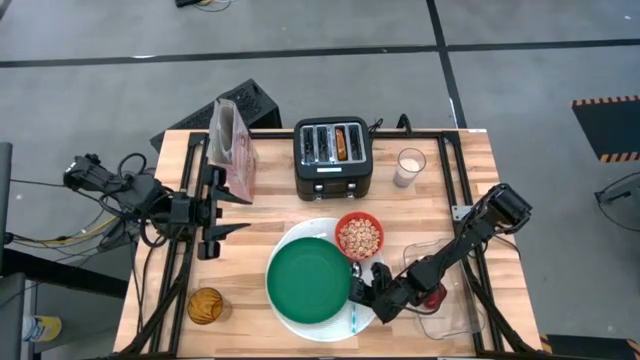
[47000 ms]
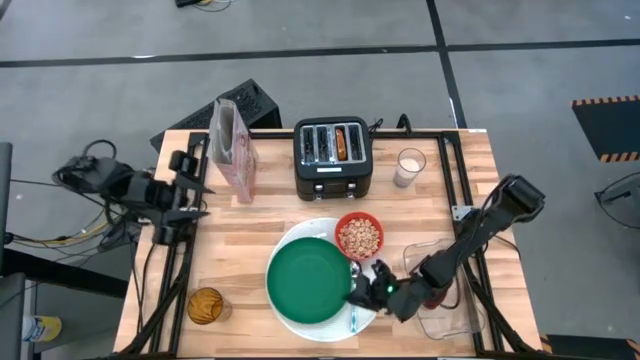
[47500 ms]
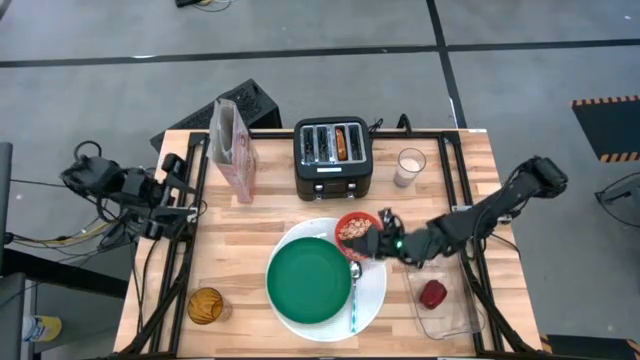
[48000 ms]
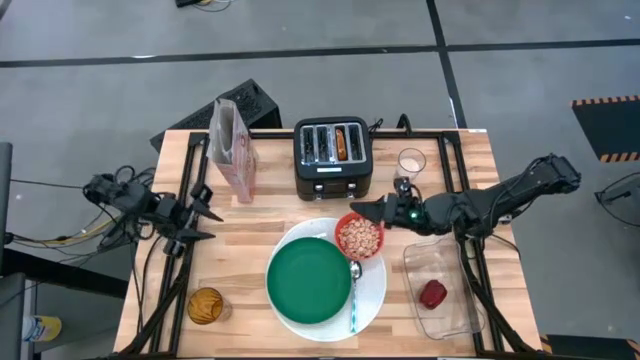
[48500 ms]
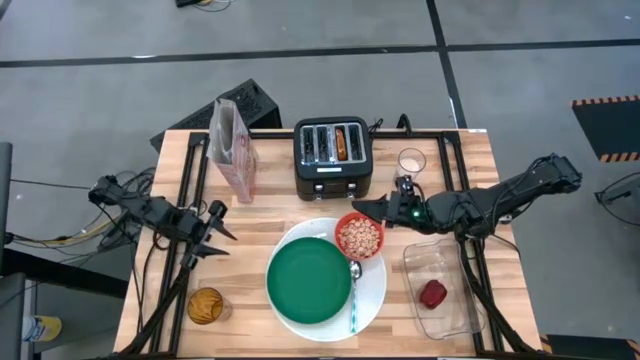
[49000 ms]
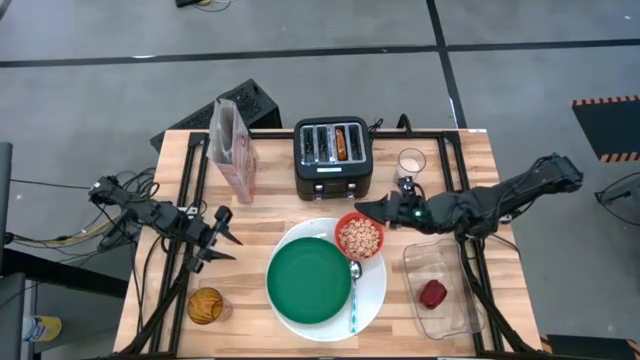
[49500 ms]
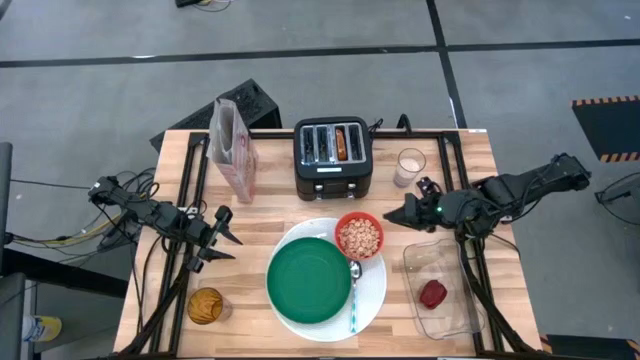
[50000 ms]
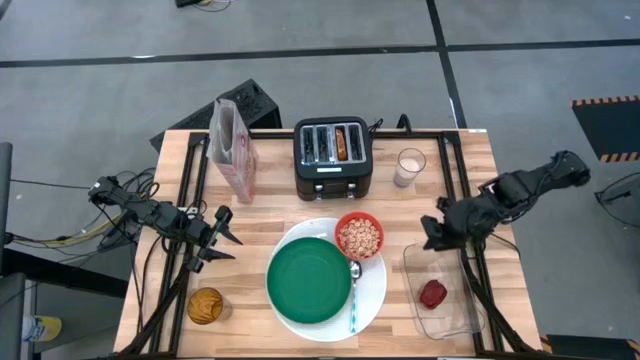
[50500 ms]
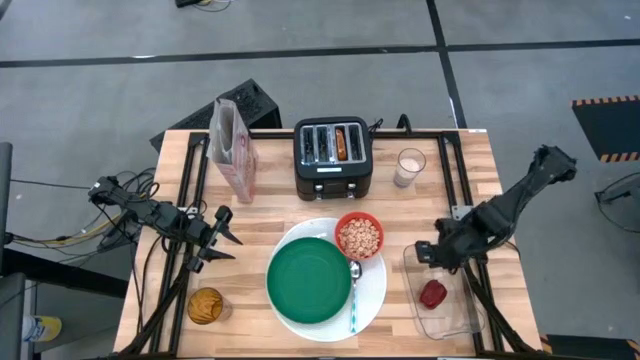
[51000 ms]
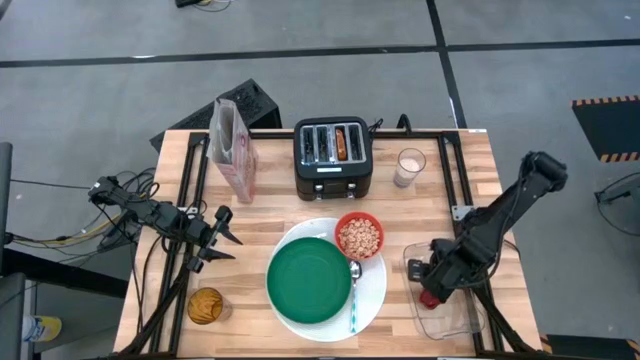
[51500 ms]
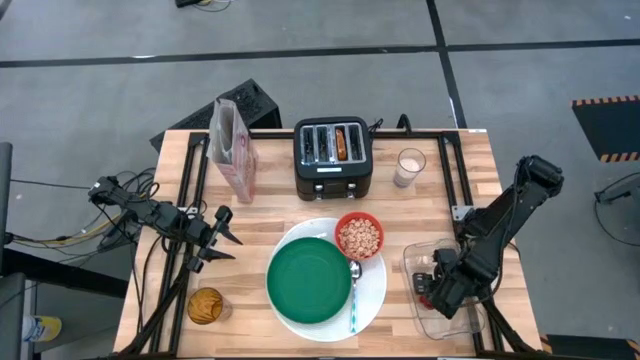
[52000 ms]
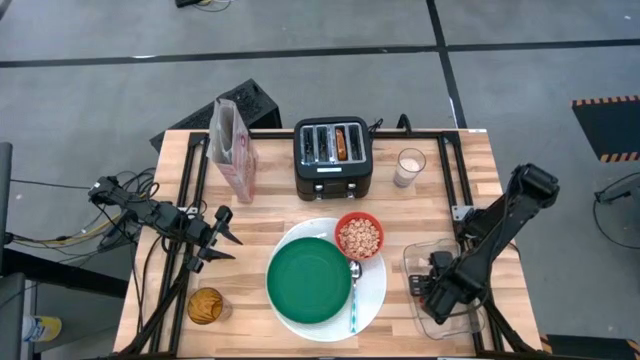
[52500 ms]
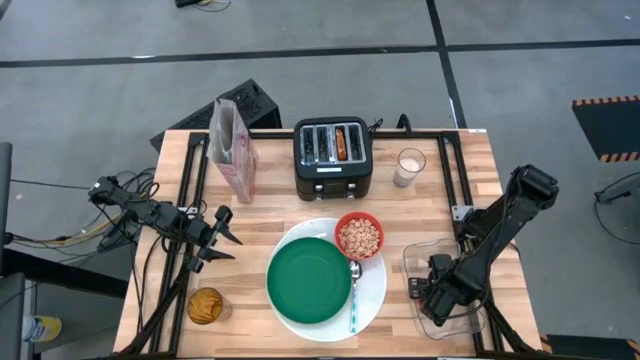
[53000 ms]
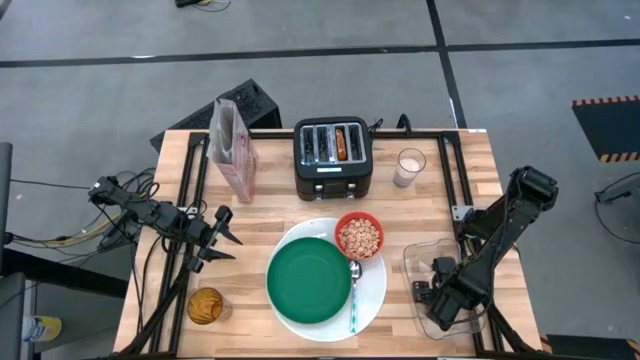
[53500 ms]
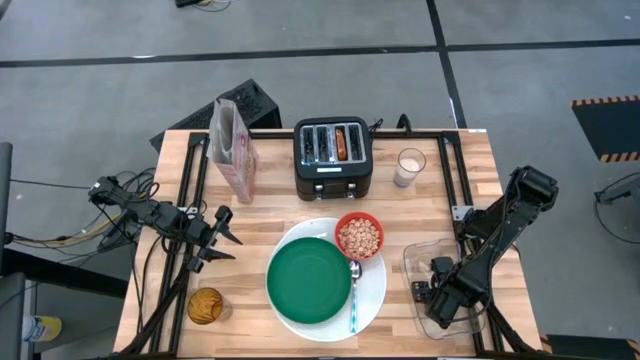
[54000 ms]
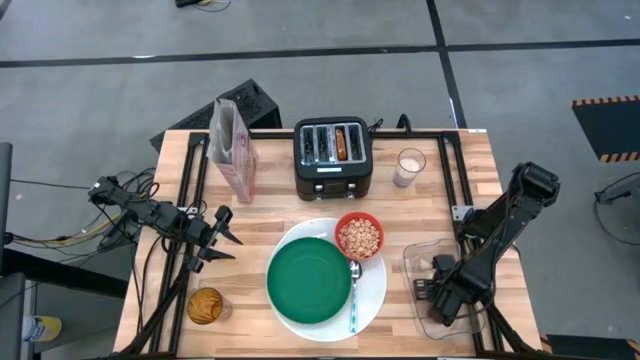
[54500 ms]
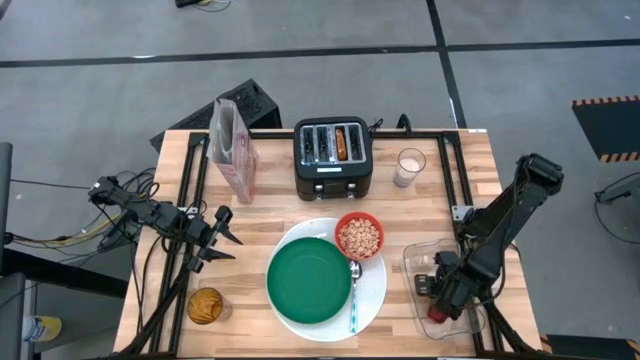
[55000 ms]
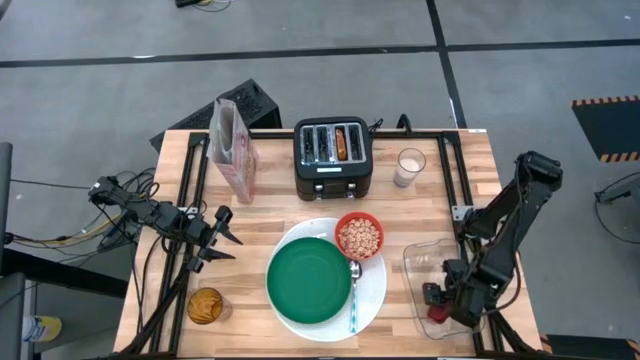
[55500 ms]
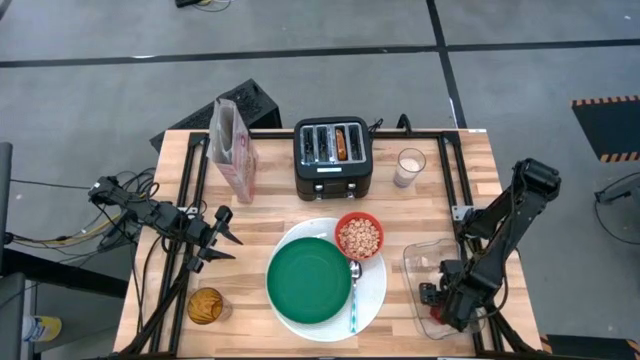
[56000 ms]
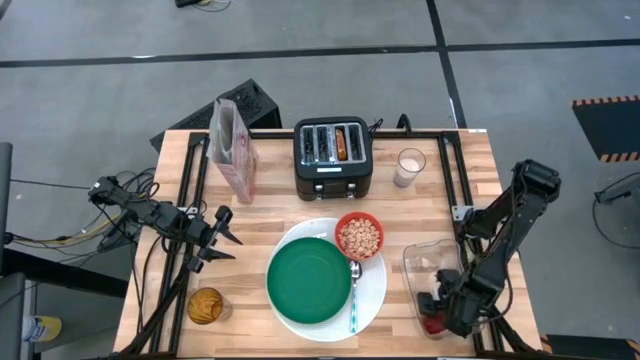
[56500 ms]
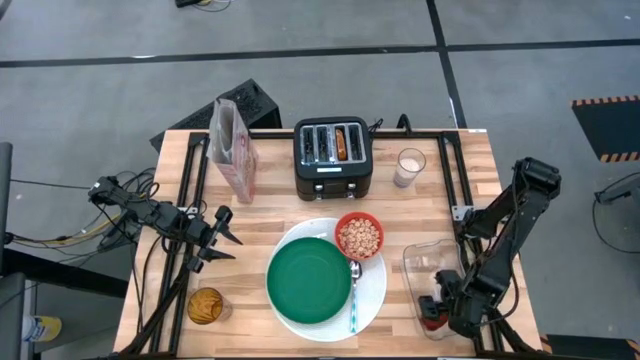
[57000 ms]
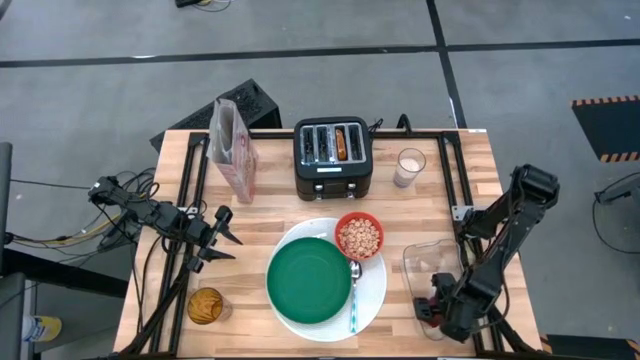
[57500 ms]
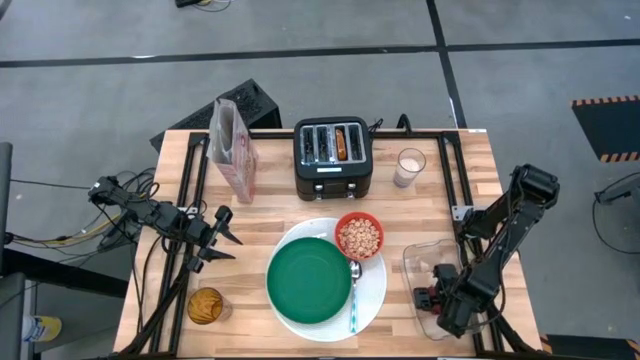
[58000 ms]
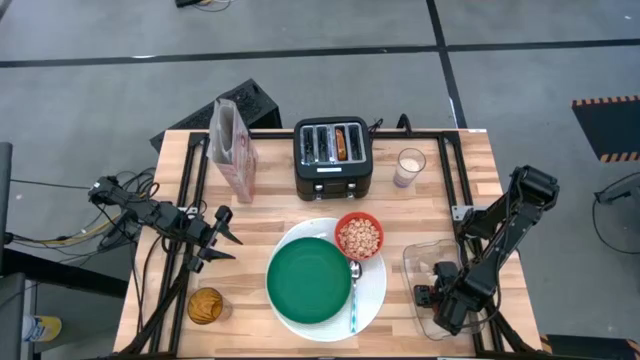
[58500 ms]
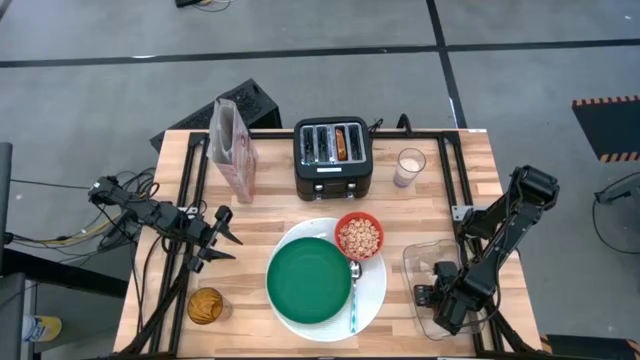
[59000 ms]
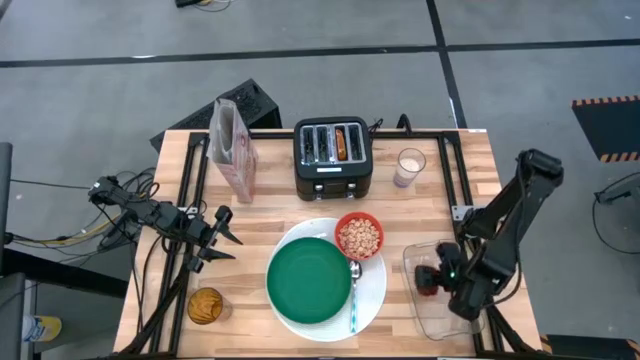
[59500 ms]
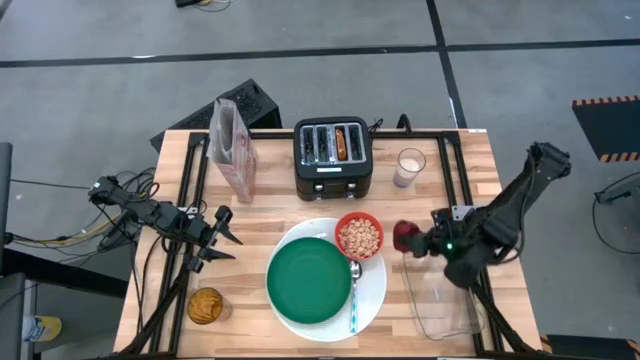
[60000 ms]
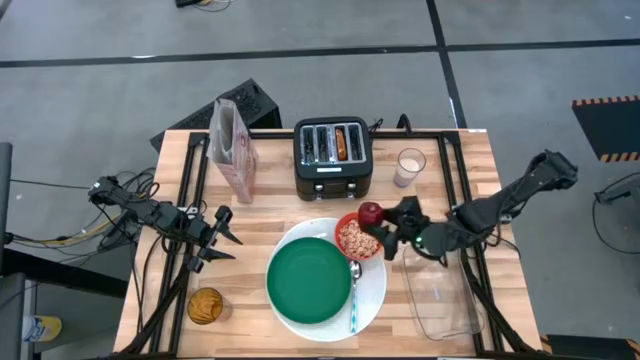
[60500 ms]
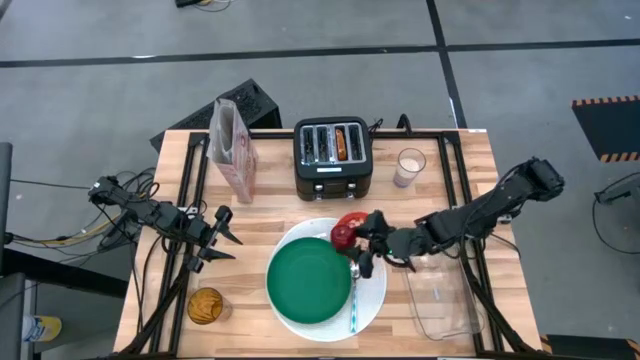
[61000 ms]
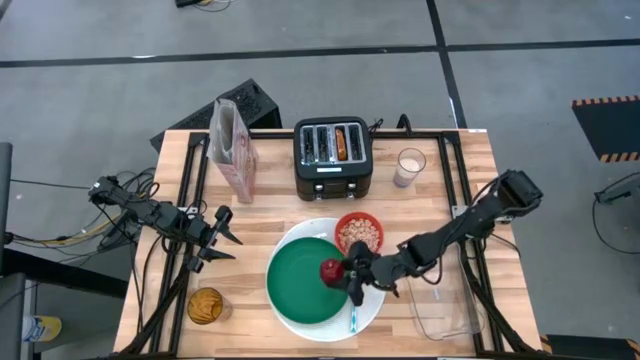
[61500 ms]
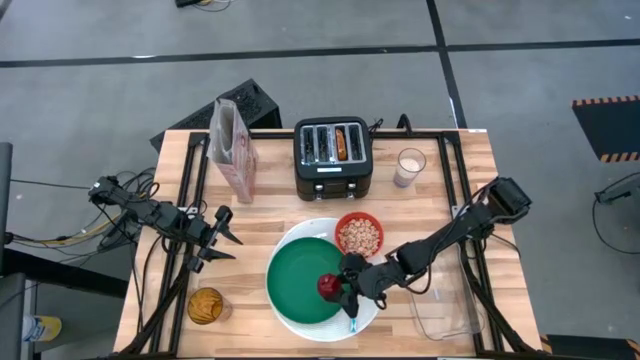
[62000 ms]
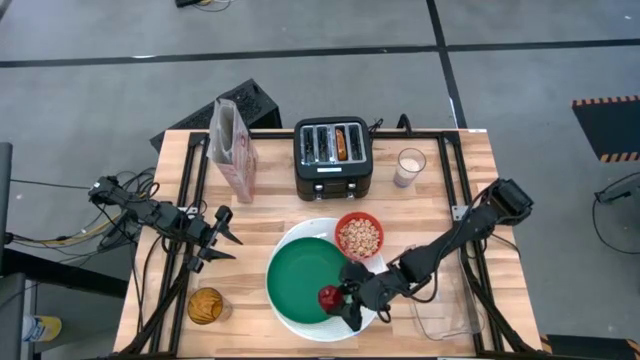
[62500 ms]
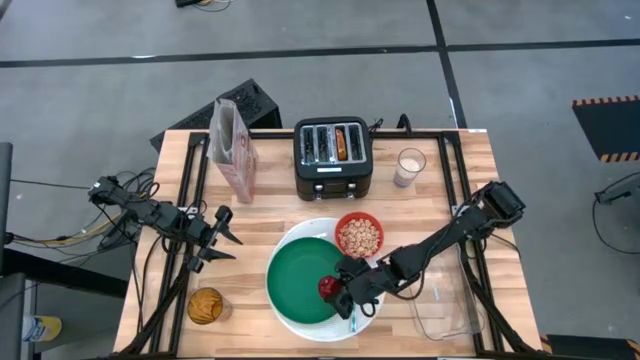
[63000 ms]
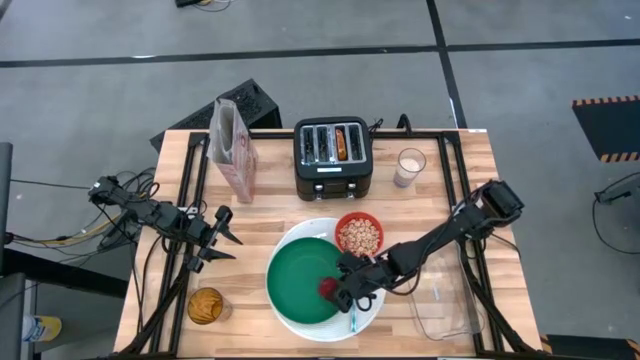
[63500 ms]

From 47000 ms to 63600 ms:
Task: Arrange a breakfast setting
Put the apple on the plate
